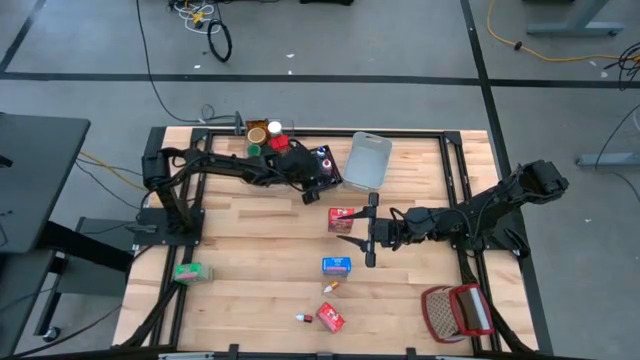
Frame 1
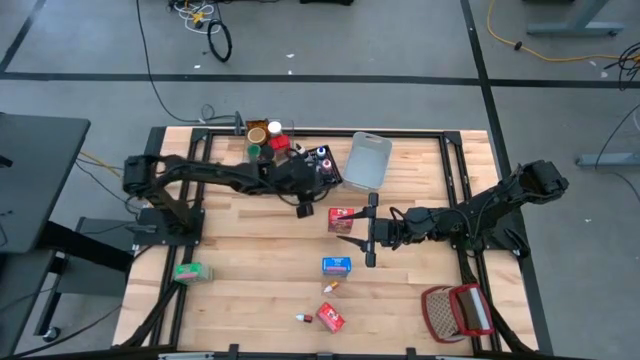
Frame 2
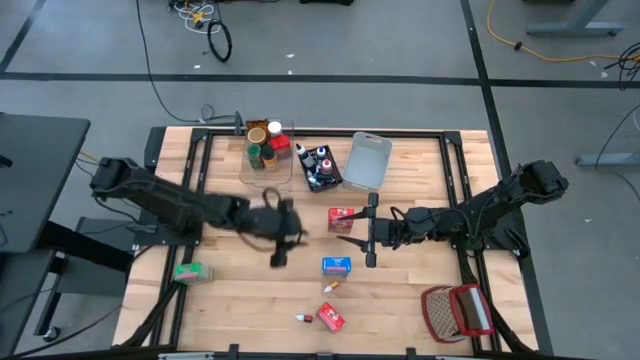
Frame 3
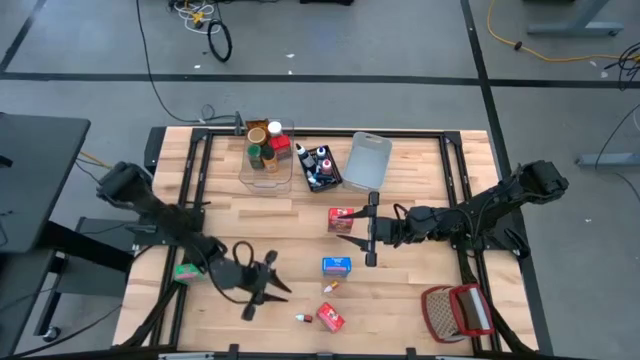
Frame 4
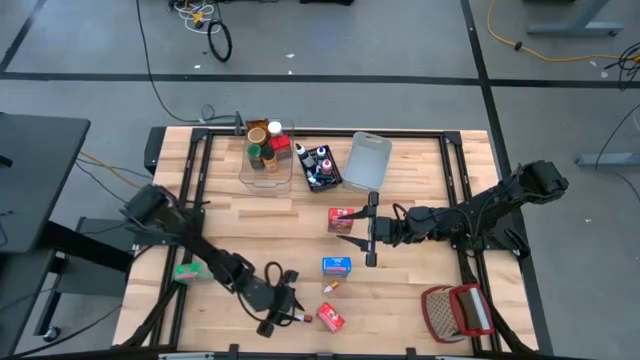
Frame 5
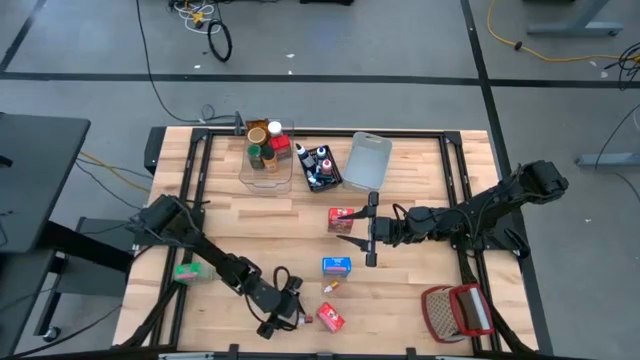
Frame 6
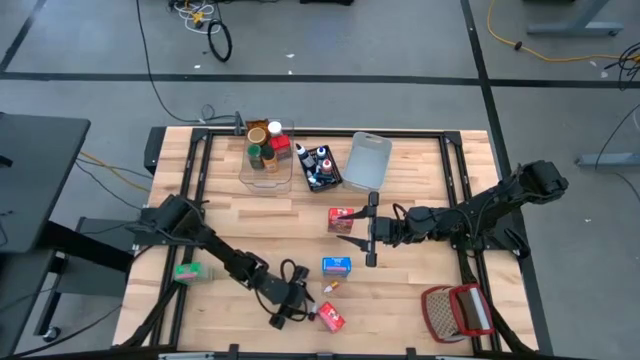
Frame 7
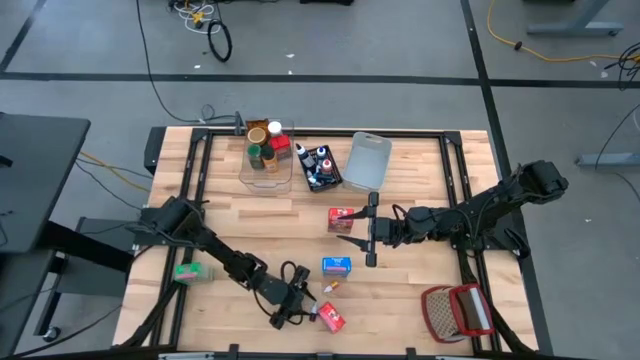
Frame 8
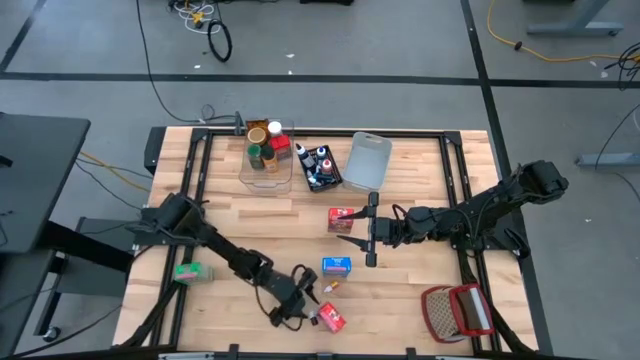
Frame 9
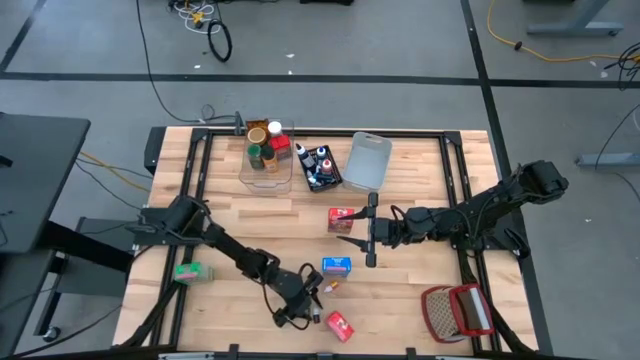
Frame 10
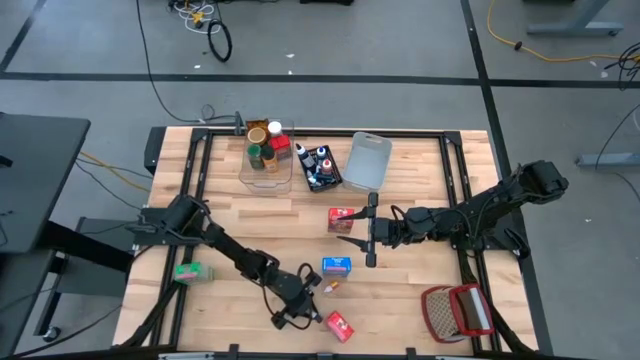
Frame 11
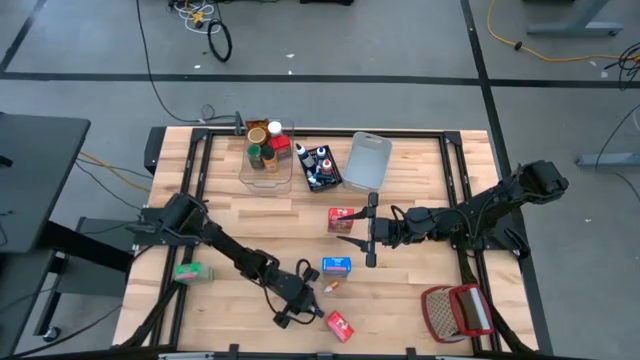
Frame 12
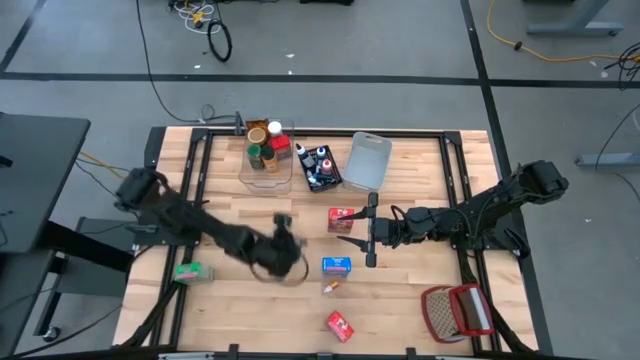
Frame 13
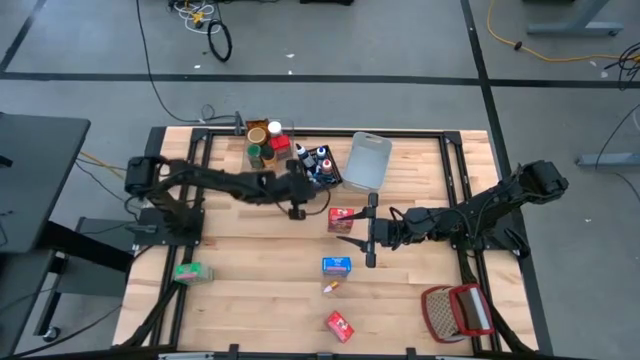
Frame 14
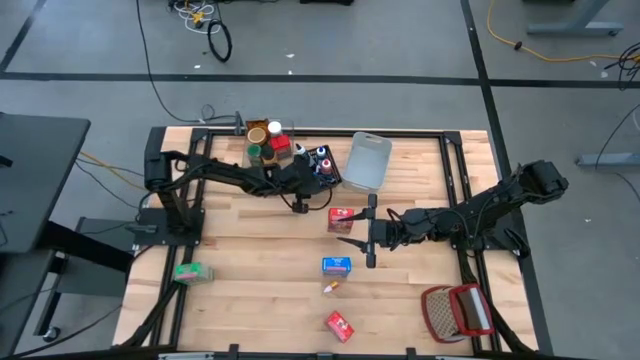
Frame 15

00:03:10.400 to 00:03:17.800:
Task: Pick & Place Kitchen Items
Put the red food coloring bottle into the black bin

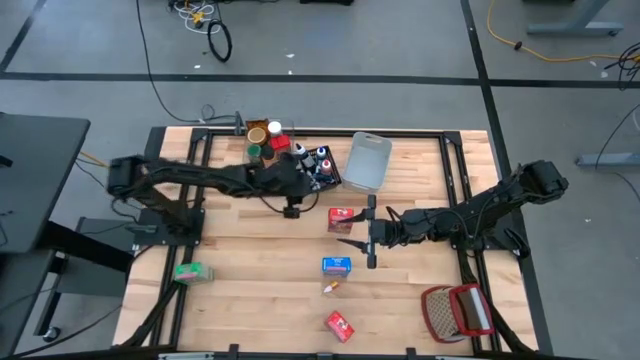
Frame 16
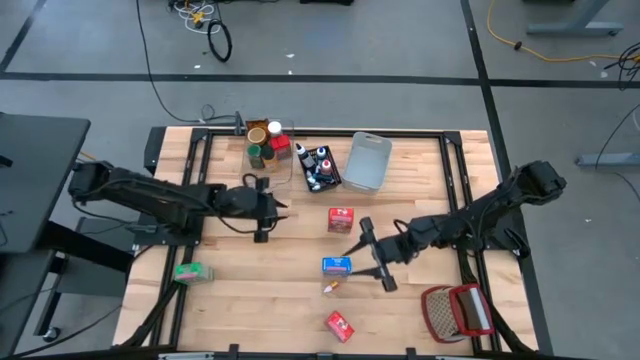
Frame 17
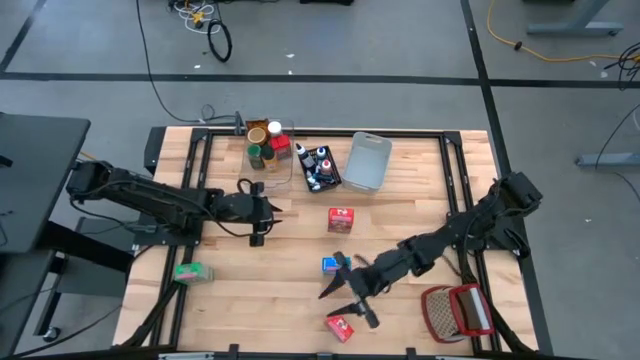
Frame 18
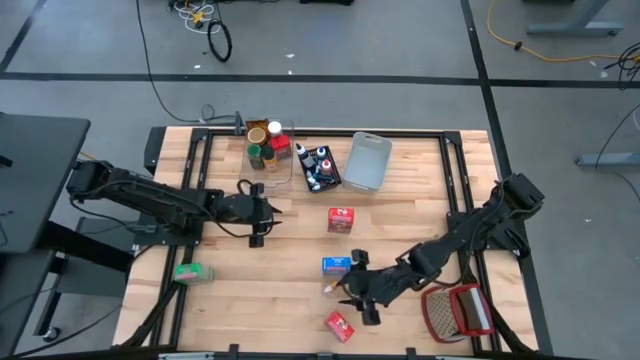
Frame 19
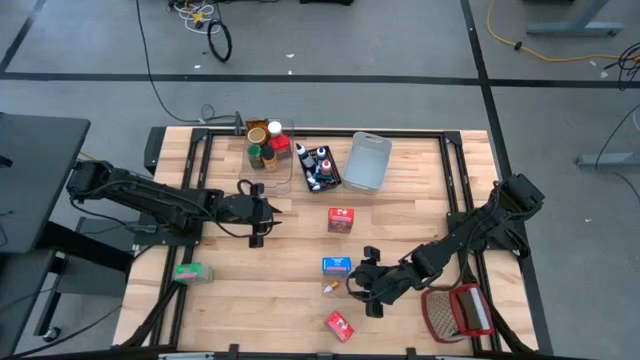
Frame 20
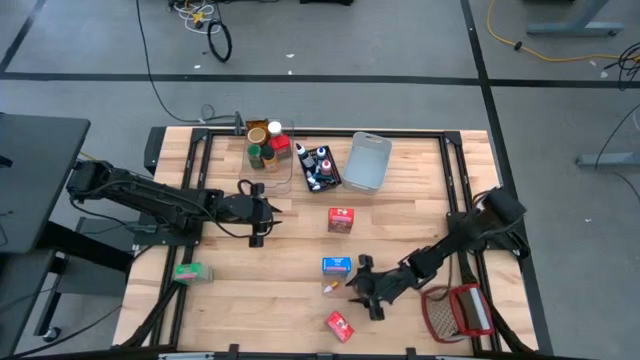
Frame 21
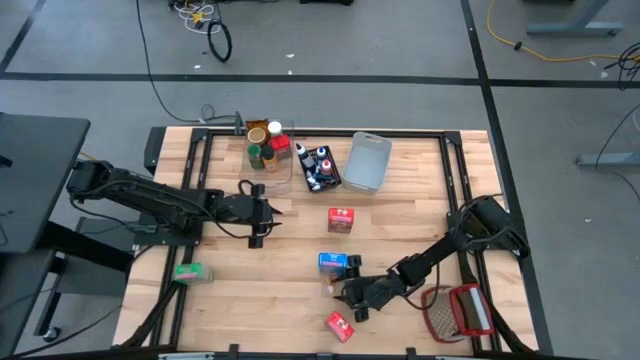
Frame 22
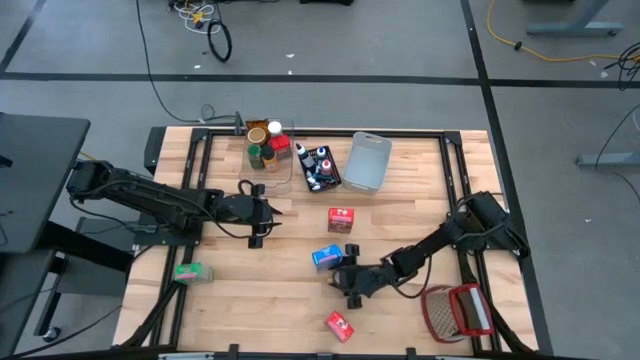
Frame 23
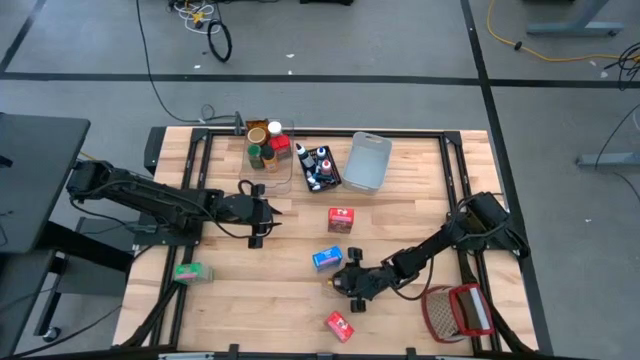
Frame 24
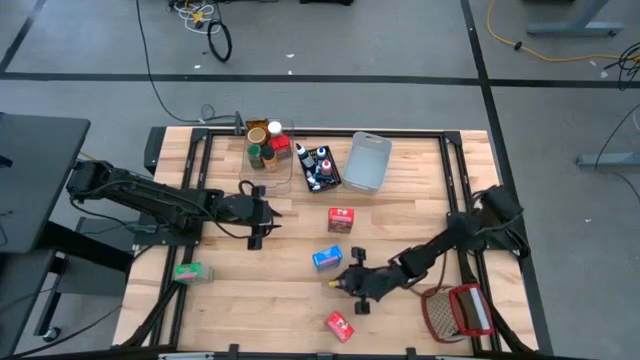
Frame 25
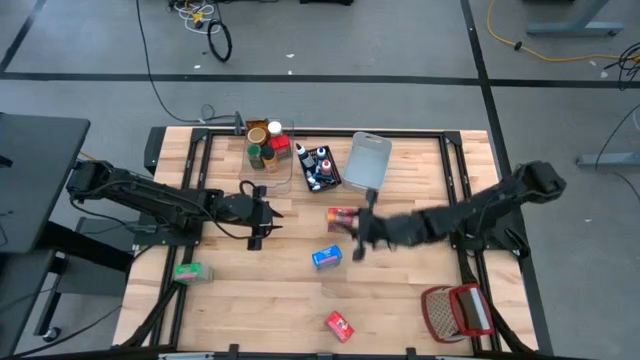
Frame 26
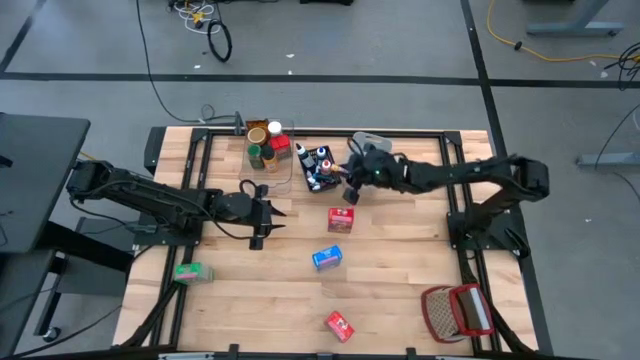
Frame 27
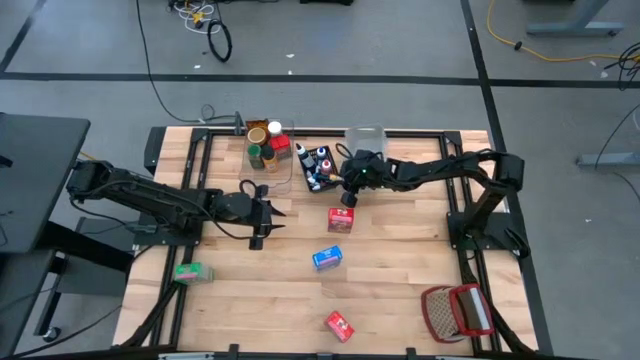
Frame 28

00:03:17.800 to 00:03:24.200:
Put the yellow food coloring bottle into the black bin

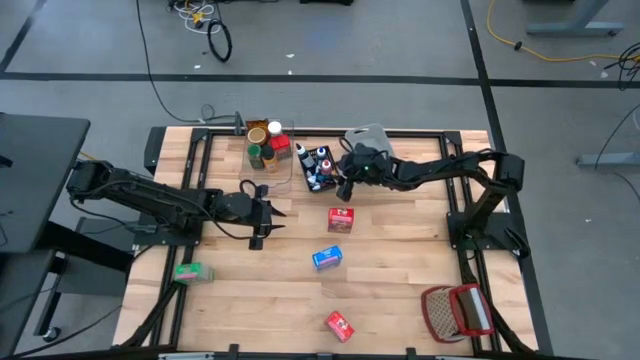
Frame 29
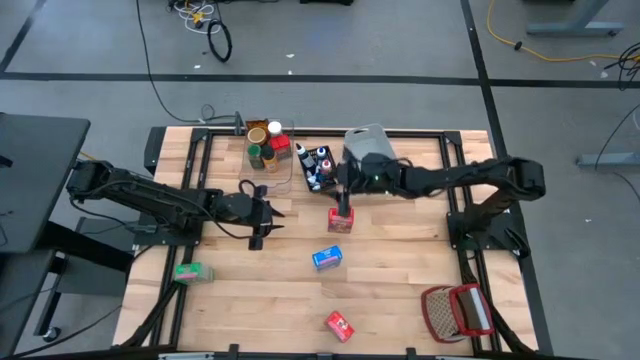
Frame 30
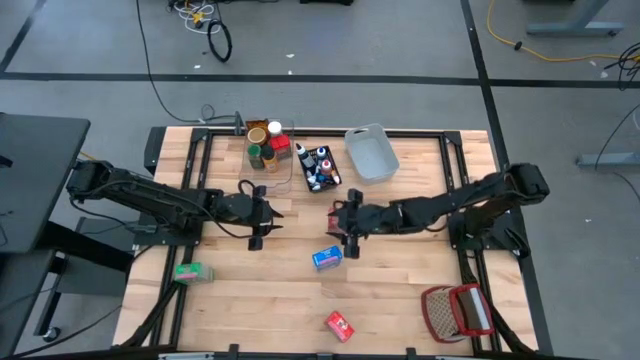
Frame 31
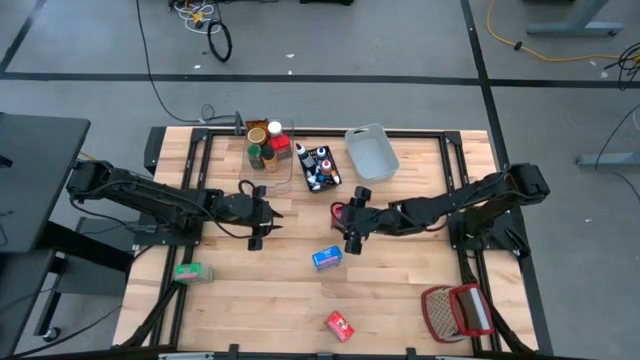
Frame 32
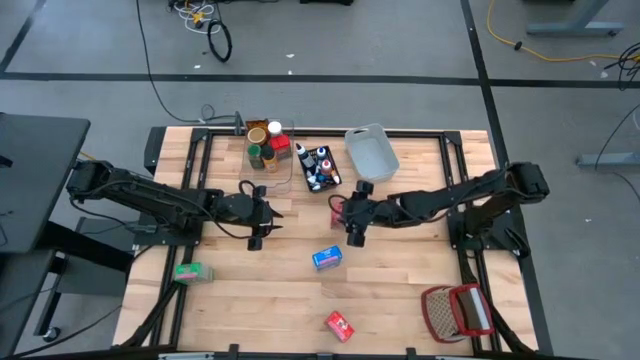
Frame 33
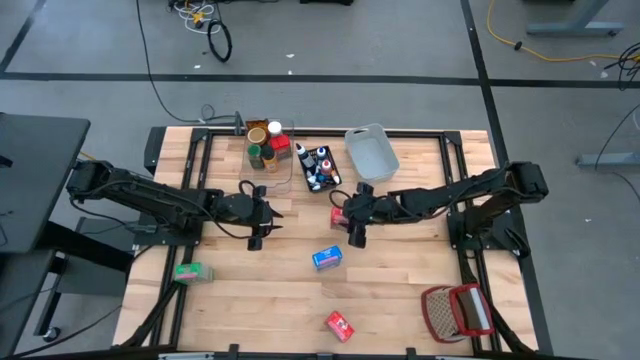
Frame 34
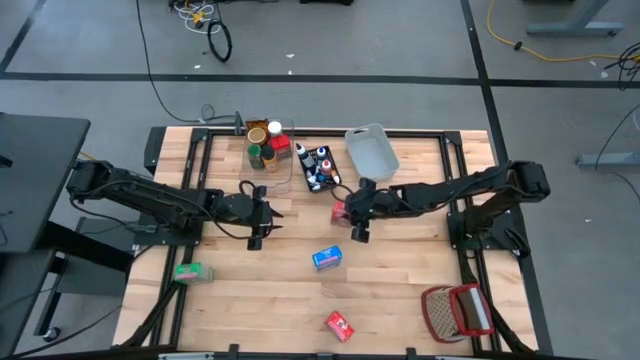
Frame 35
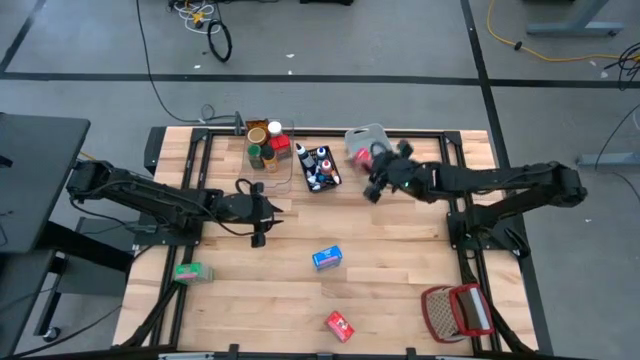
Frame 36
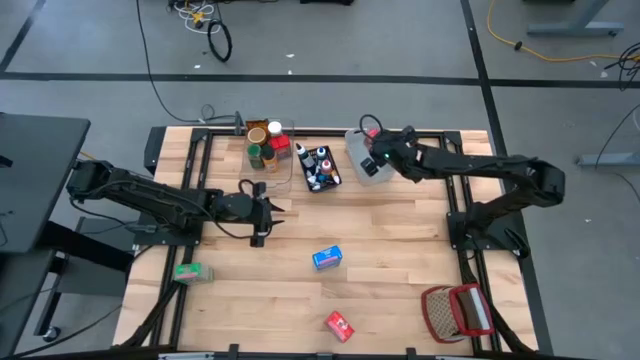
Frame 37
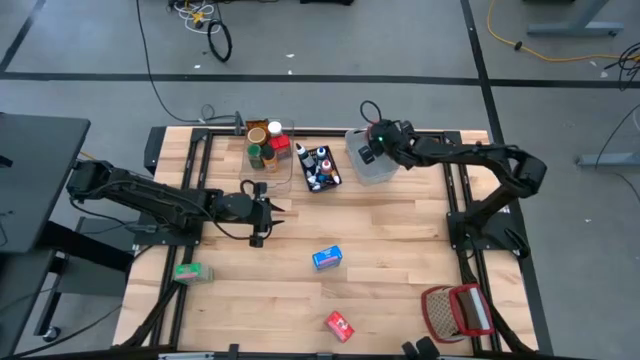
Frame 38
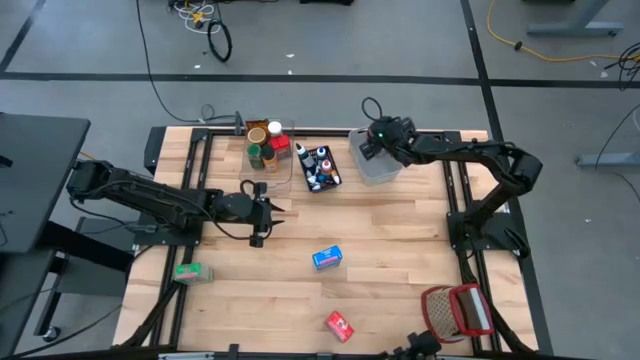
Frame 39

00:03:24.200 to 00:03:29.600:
Put the top red cereal box into the gray bin

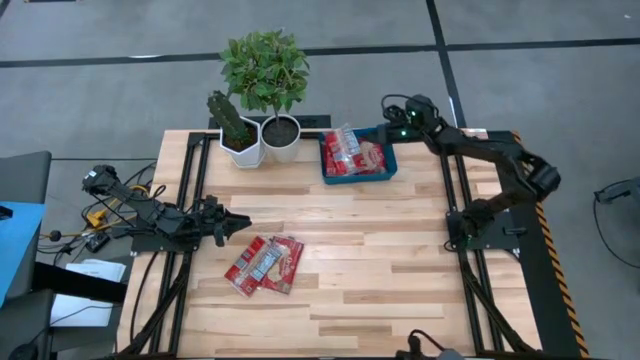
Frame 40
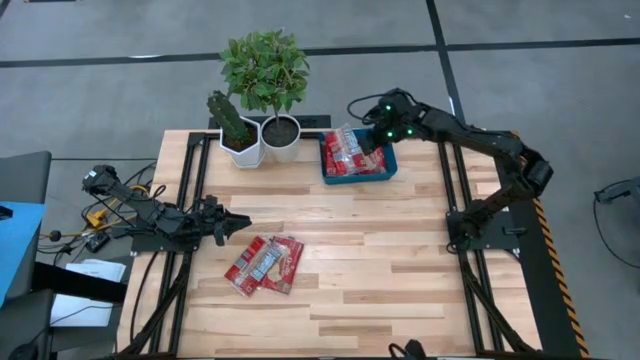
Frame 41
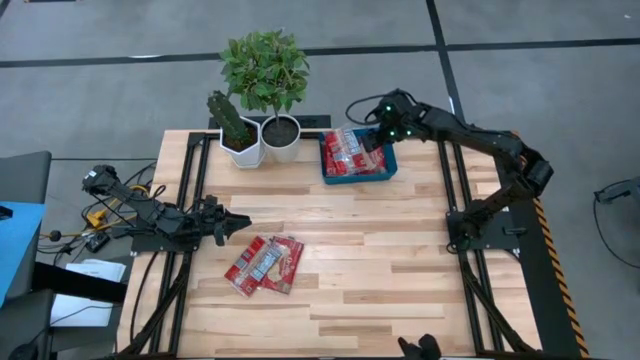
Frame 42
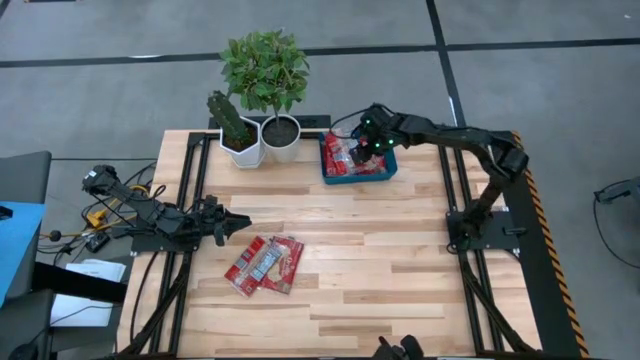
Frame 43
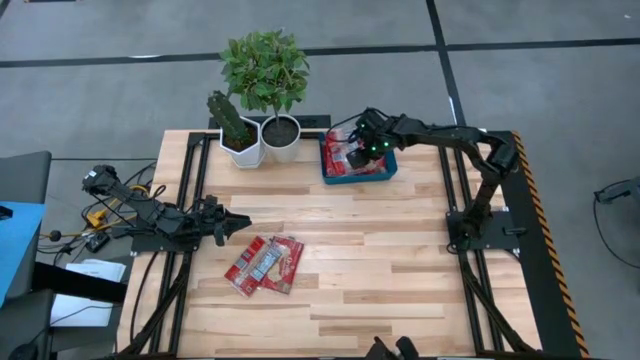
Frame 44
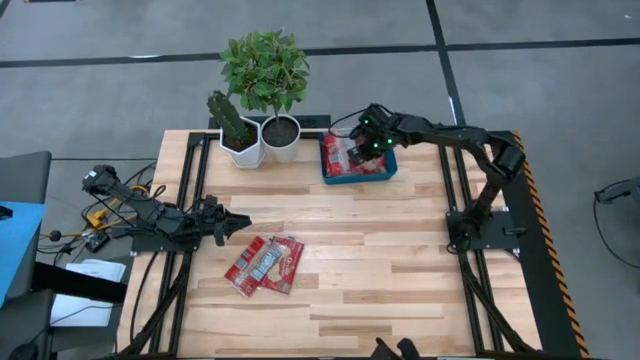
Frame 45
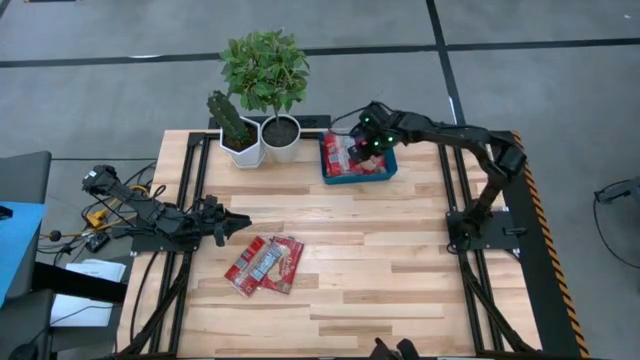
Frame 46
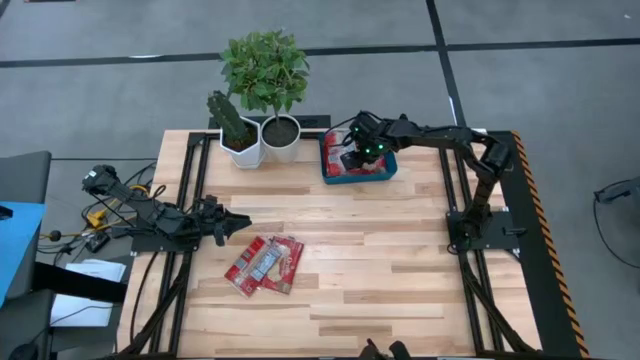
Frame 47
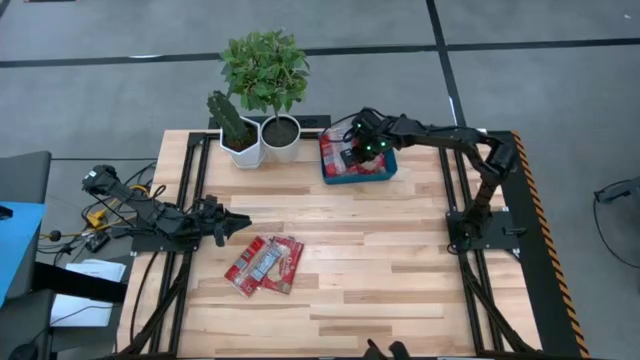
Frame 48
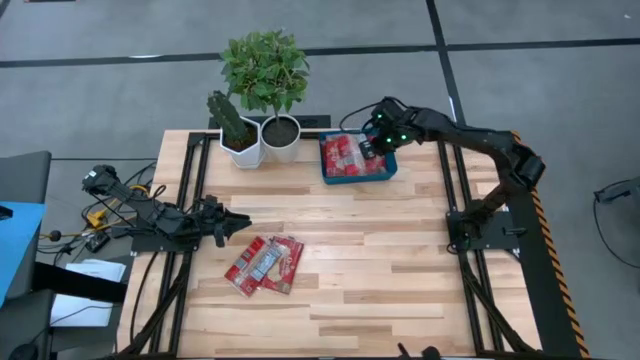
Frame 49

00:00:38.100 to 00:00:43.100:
Task: Sort popcorn bags into baskets
Adjust the red popcorn bag into the blue container
